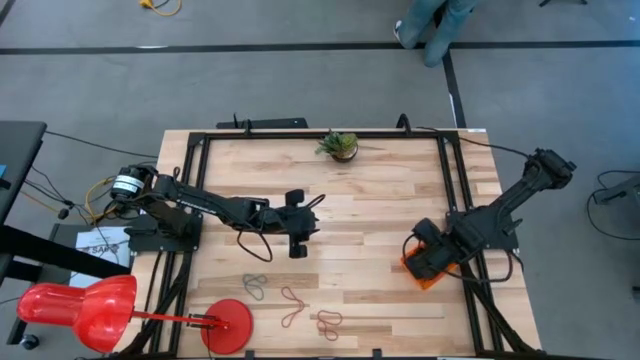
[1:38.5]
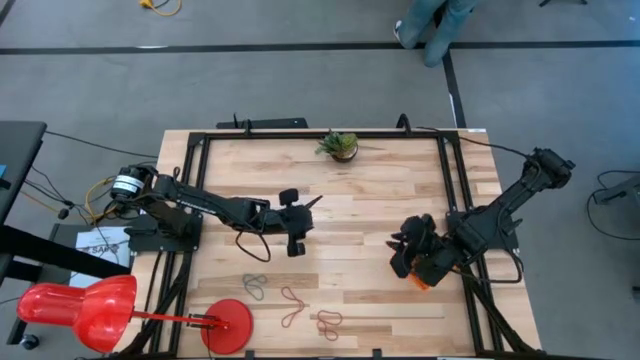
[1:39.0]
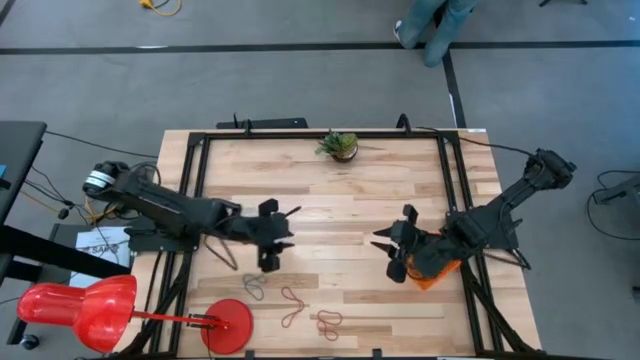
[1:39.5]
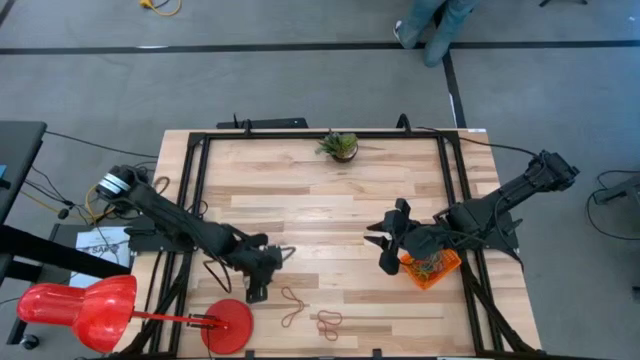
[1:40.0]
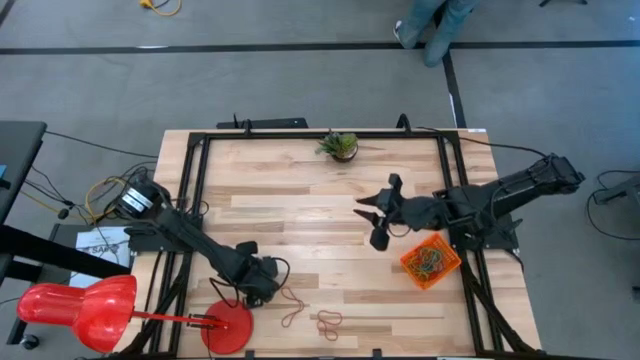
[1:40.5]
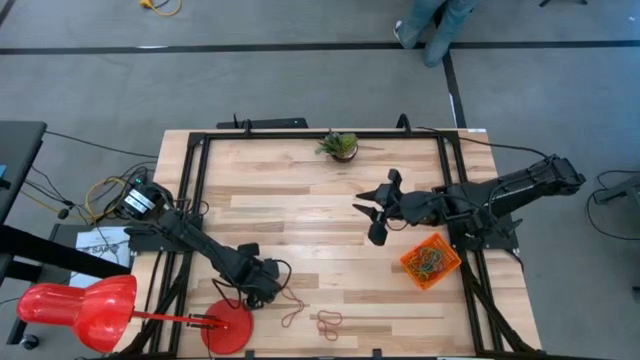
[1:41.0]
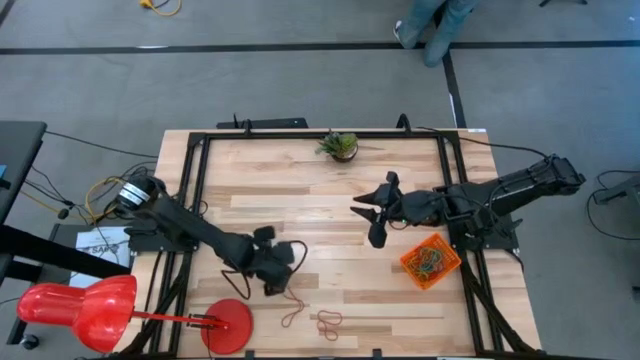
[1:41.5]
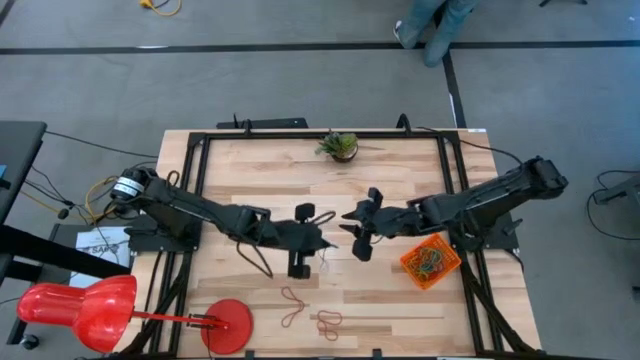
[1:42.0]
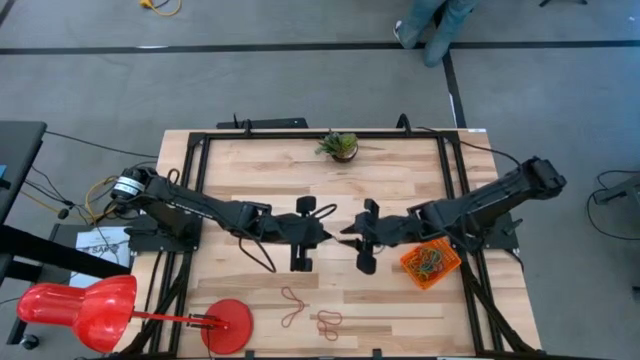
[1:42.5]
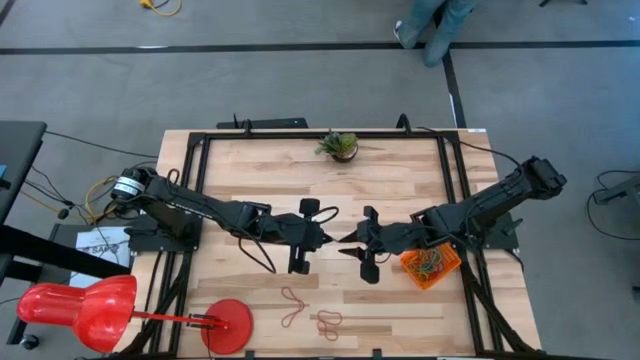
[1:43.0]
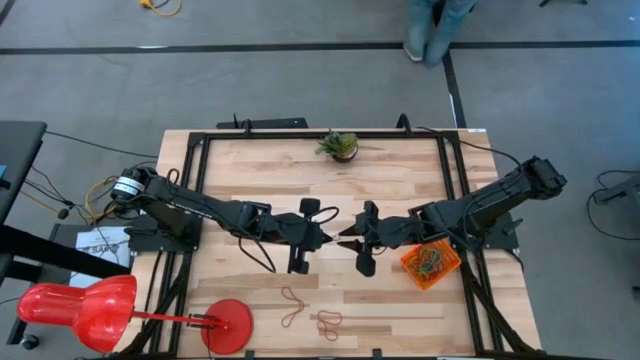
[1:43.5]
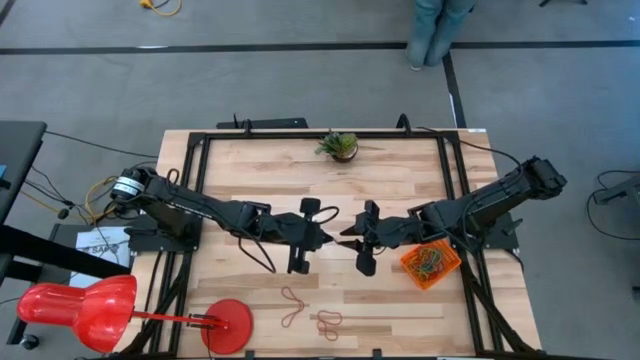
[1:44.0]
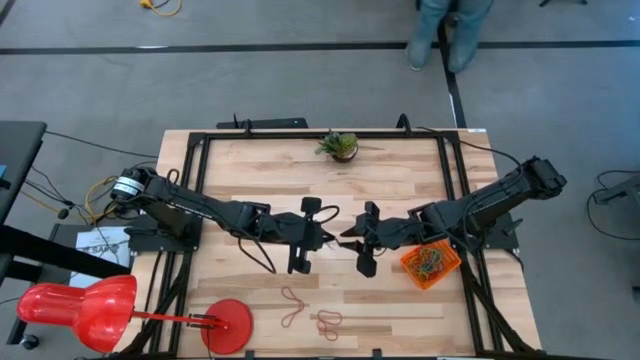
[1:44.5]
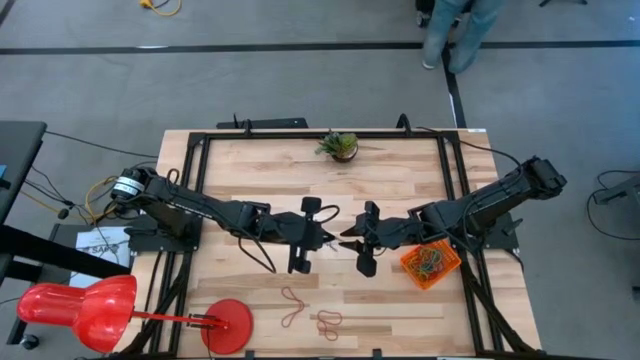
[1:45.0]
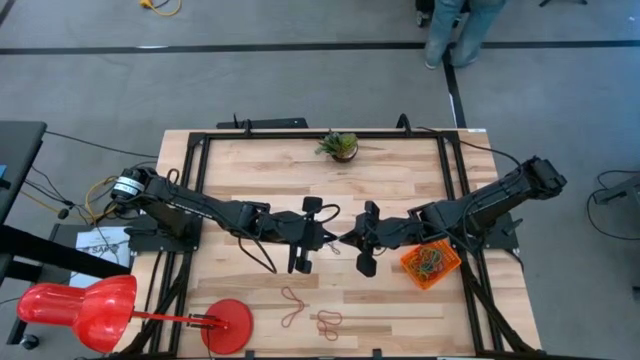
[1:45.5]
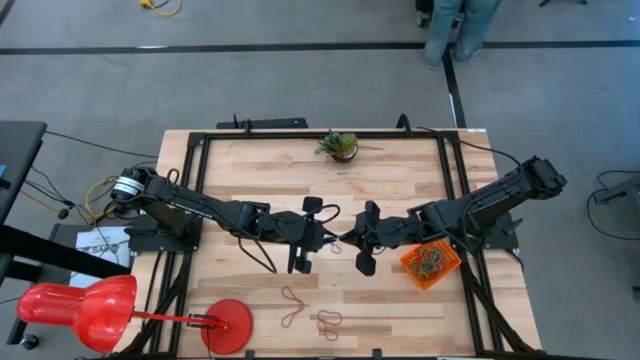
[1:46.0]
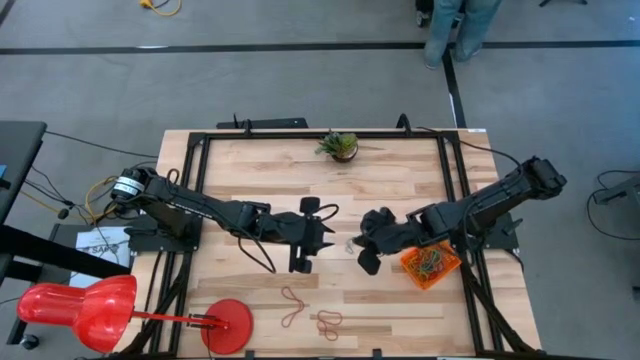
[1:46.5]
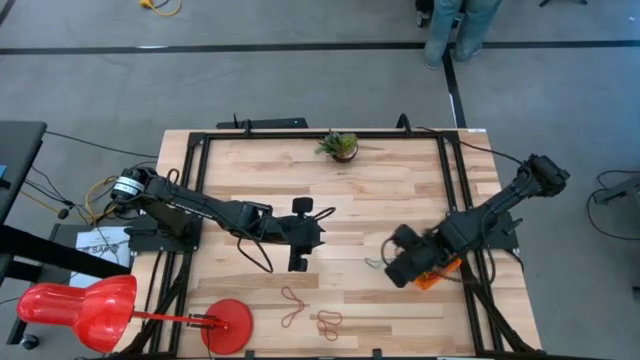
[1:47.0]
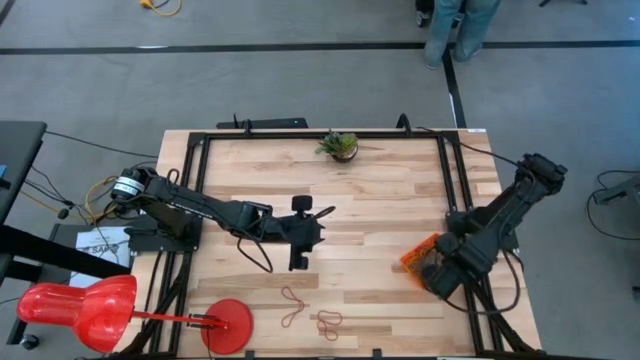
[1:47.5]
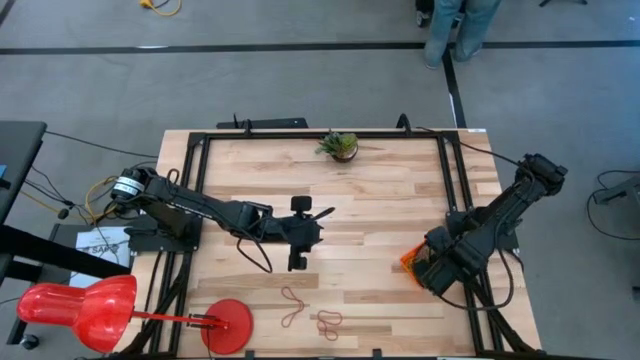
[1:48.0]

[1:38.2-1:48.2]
Task: Pick and place rubber bands into bin
Put the blue rubber band into the orange basket

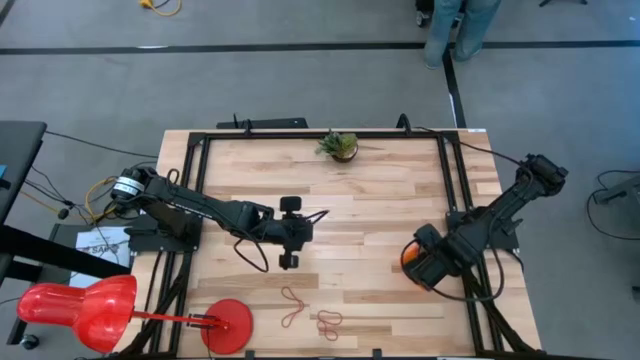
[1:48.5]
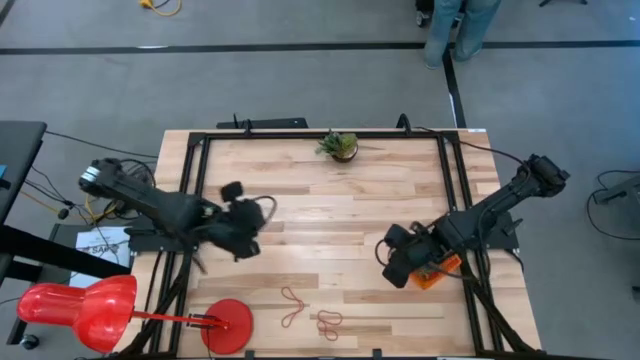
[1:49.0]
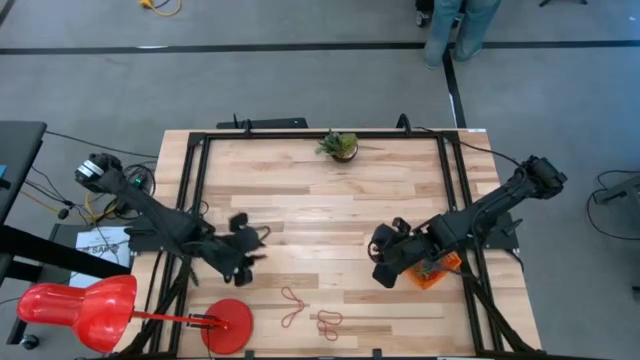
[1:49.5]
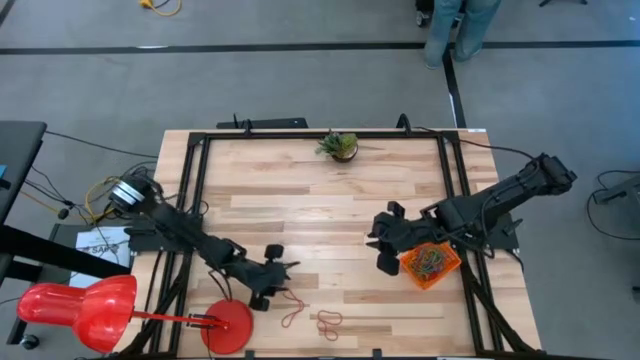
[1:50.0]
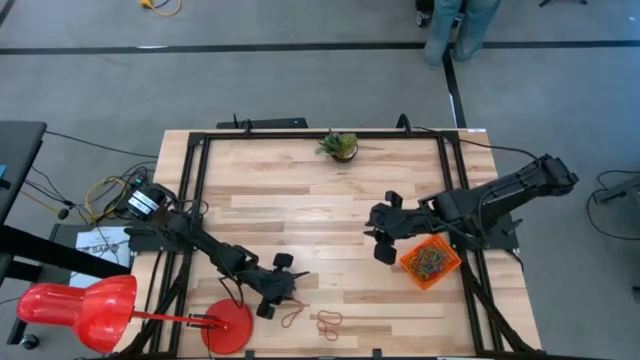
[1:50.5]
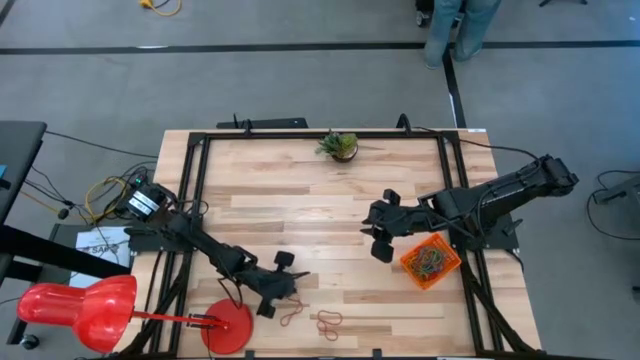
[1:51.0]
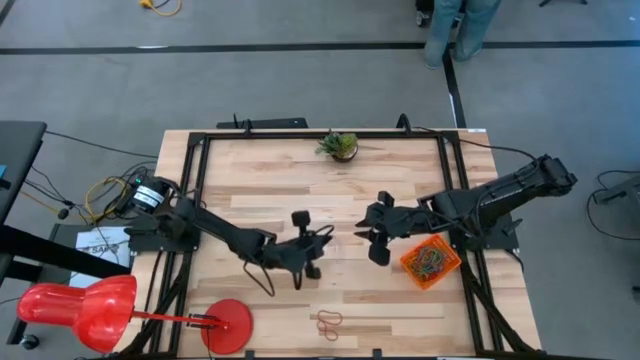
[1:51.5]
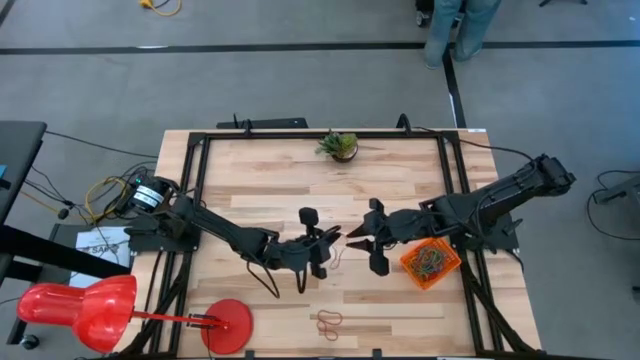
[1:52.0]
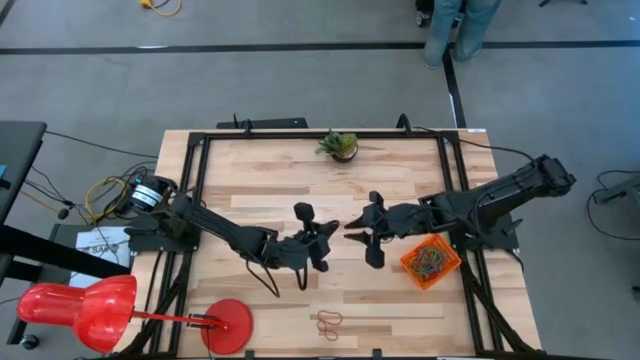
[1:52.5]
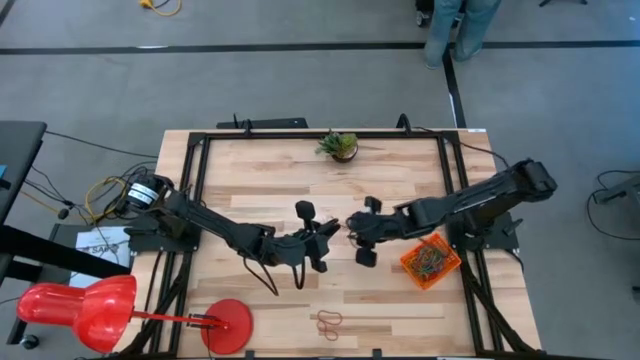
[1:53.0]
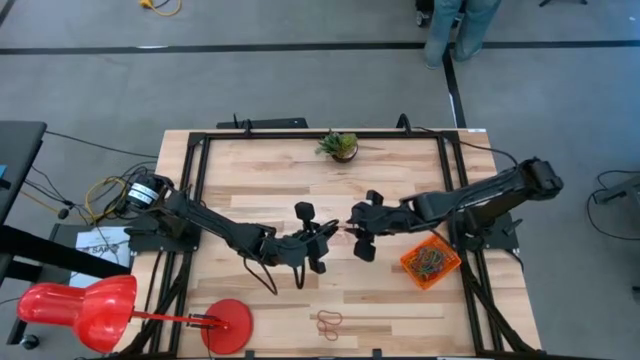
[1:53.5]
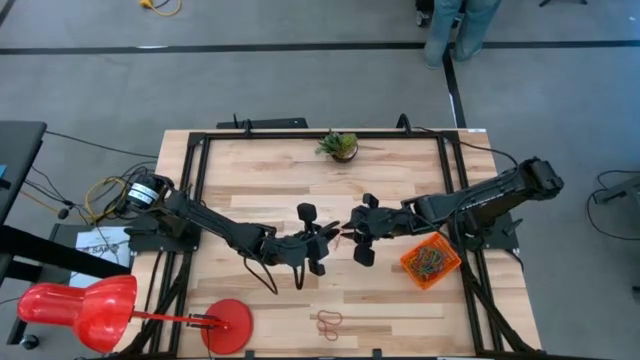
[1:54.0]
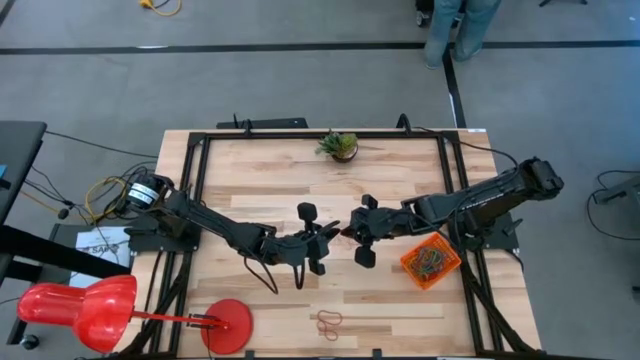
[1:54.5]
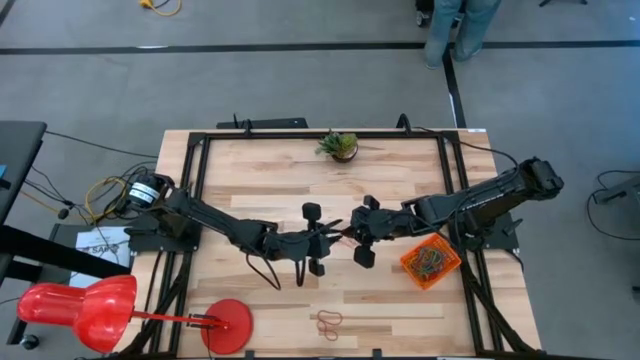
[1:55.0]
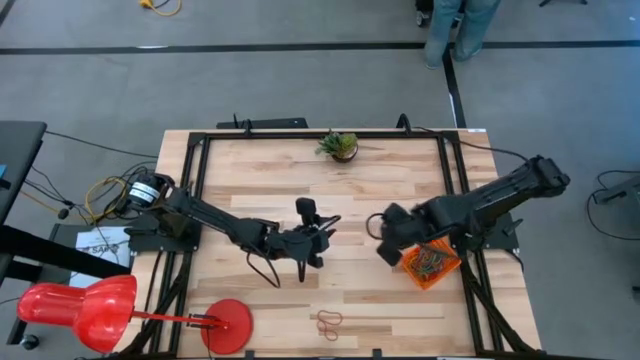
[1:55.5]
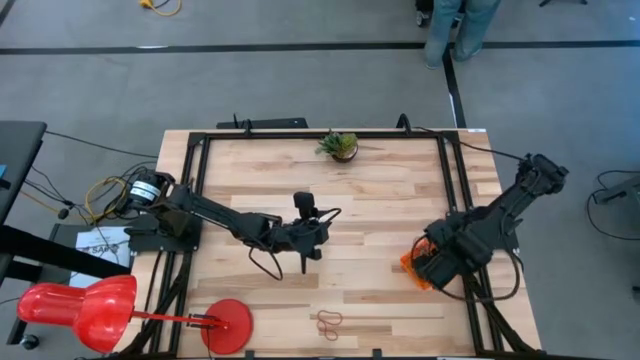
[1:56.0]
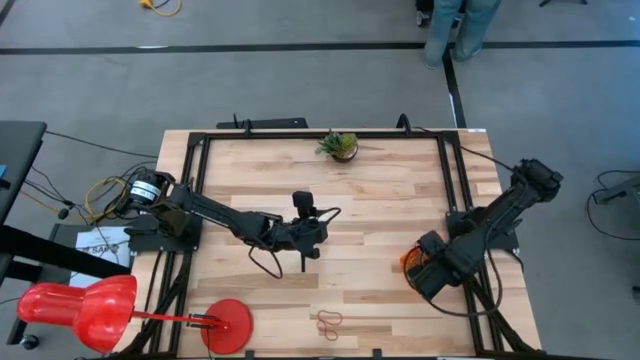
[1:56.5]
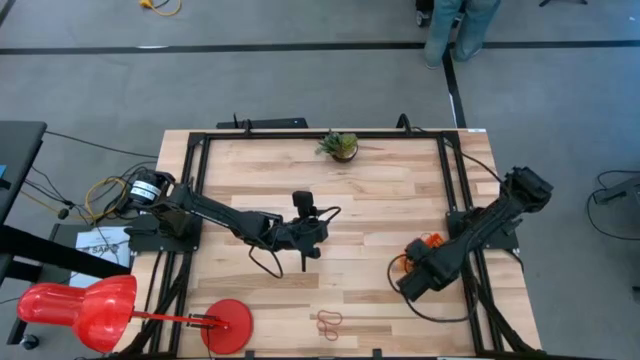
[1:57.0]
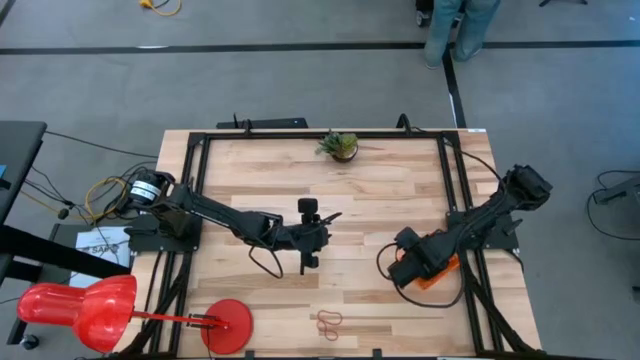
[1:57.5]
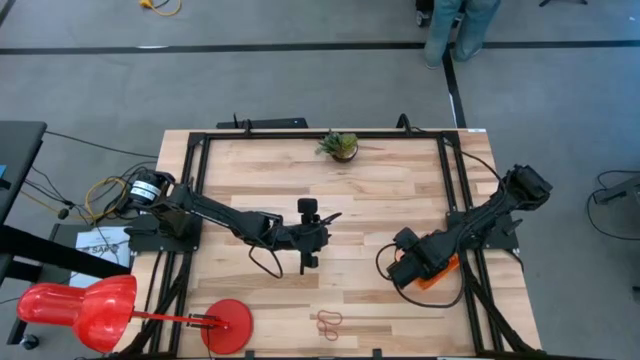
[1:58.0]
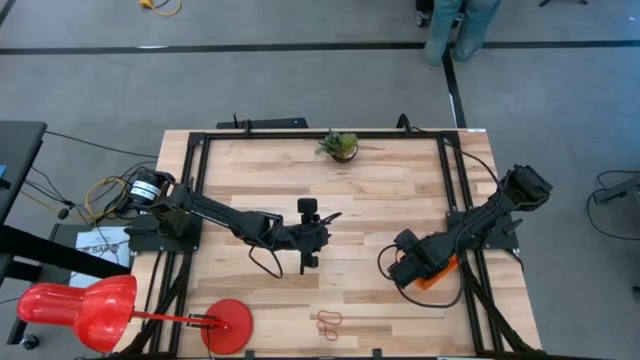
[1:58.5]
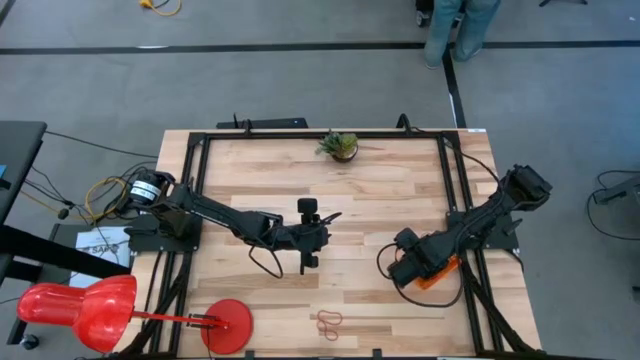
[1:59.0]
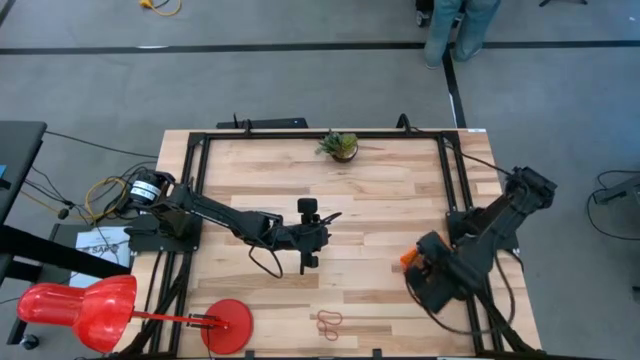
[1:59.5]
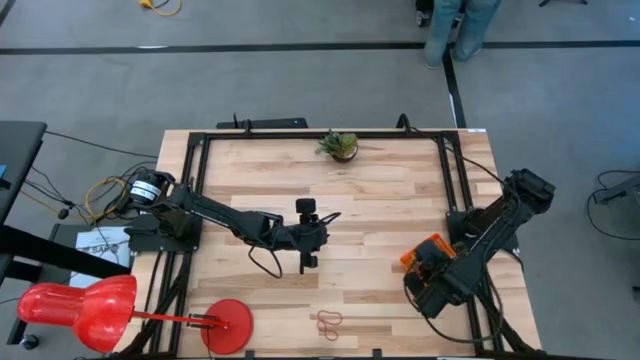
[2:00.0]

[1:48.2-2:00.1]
Put the red rubber band into the orange basket
